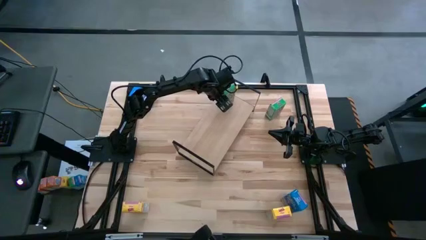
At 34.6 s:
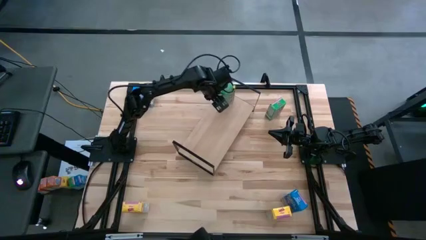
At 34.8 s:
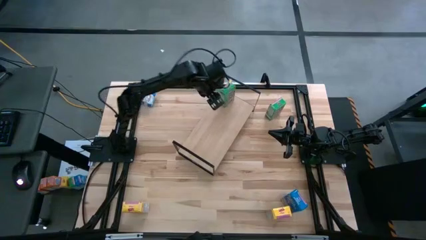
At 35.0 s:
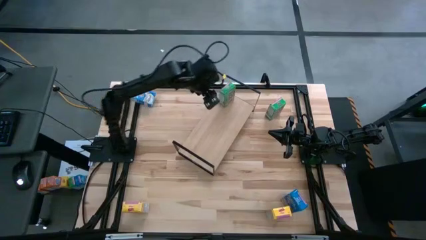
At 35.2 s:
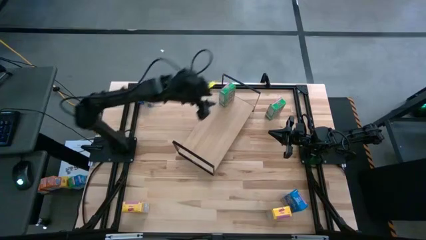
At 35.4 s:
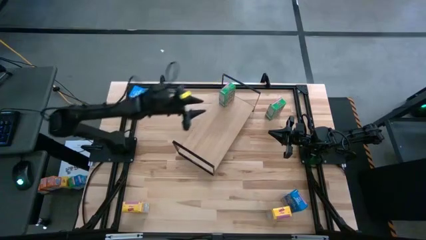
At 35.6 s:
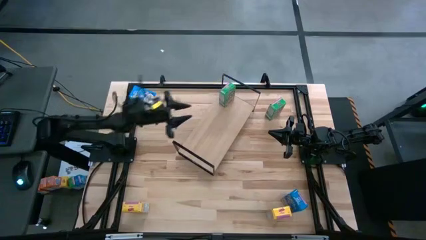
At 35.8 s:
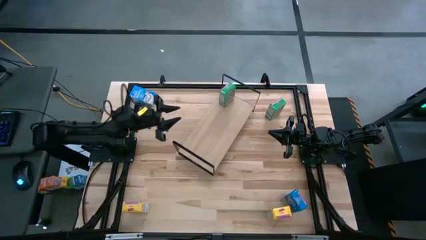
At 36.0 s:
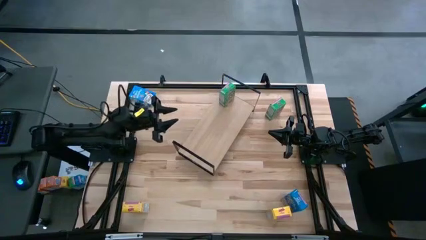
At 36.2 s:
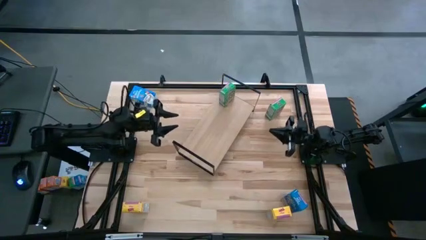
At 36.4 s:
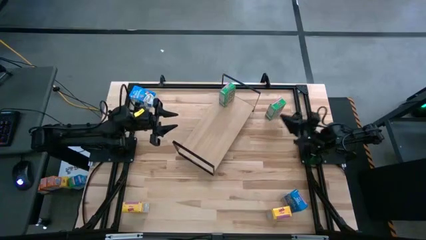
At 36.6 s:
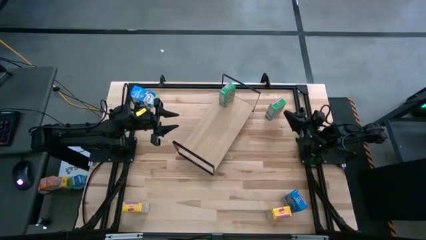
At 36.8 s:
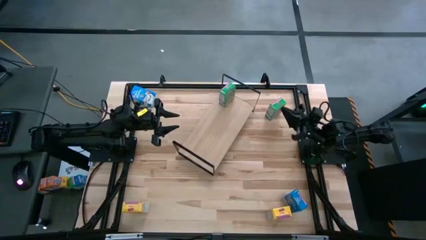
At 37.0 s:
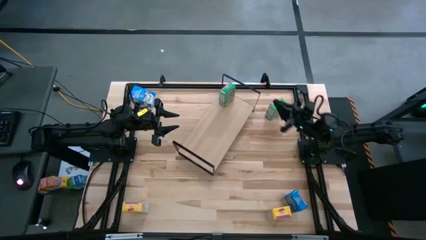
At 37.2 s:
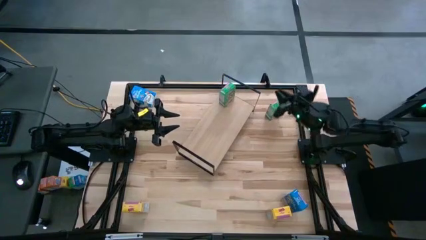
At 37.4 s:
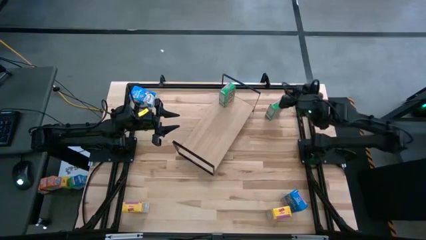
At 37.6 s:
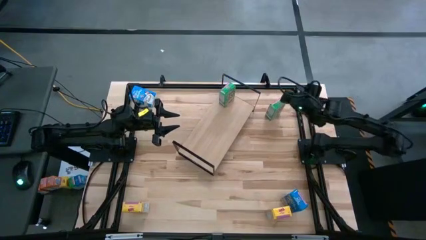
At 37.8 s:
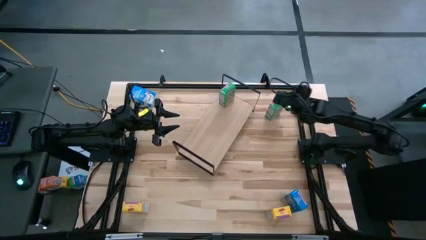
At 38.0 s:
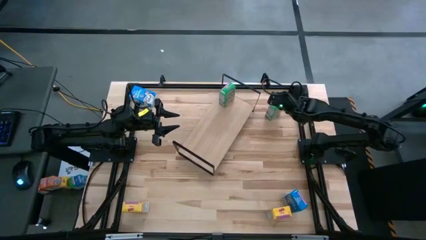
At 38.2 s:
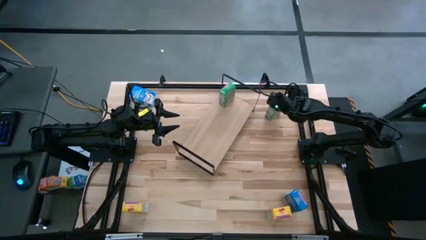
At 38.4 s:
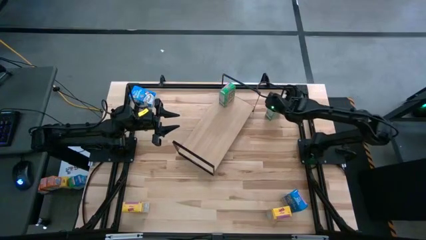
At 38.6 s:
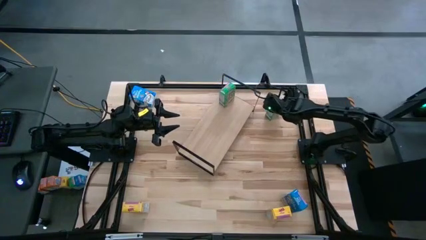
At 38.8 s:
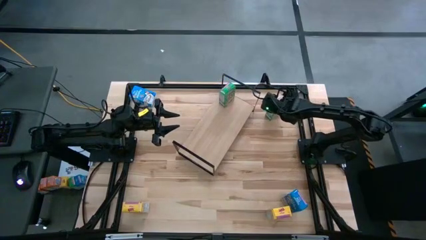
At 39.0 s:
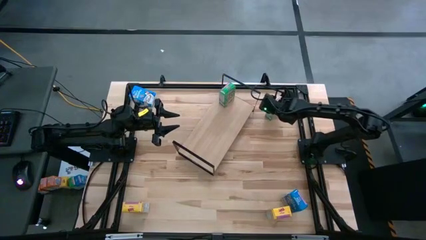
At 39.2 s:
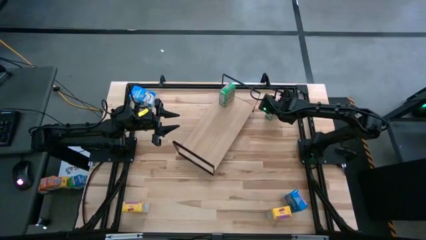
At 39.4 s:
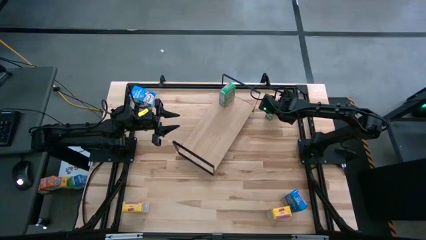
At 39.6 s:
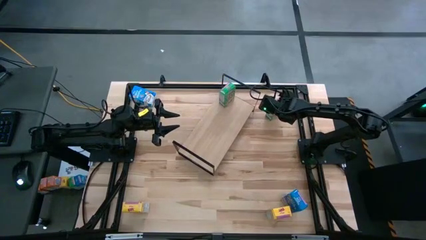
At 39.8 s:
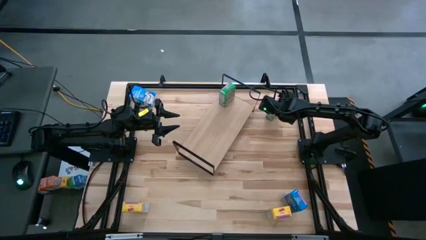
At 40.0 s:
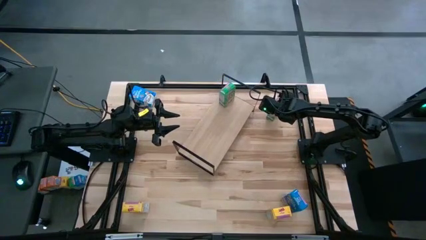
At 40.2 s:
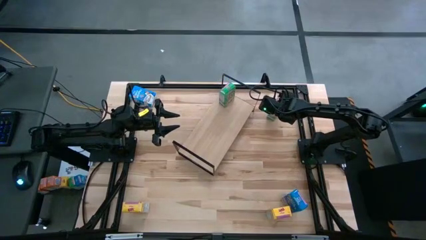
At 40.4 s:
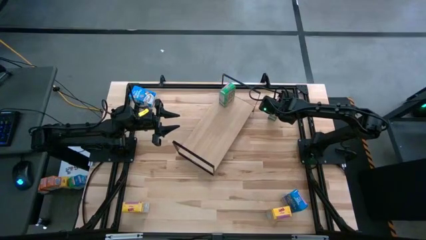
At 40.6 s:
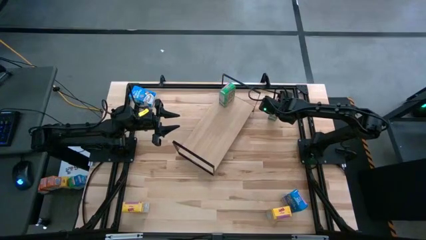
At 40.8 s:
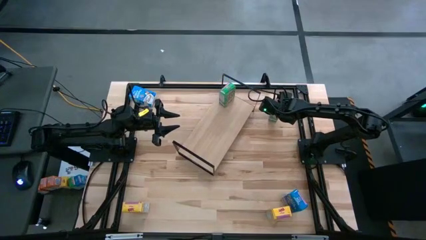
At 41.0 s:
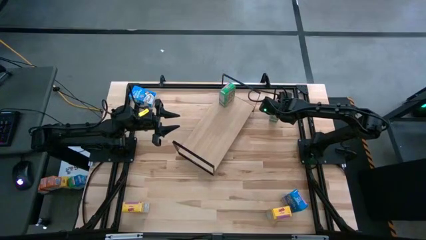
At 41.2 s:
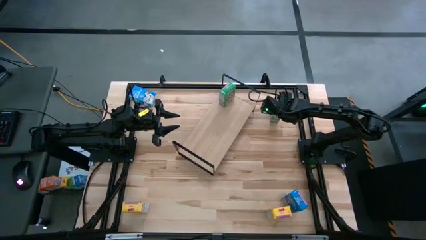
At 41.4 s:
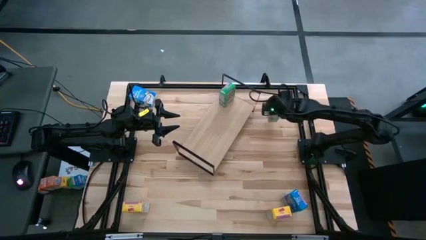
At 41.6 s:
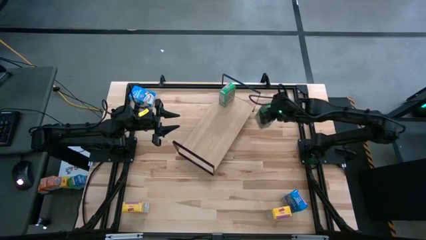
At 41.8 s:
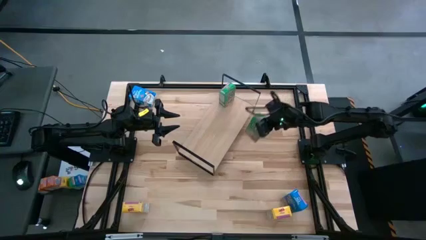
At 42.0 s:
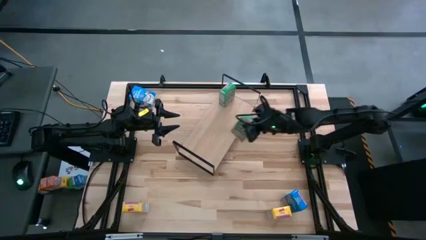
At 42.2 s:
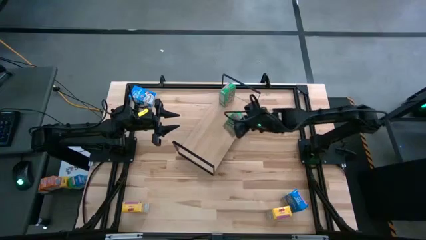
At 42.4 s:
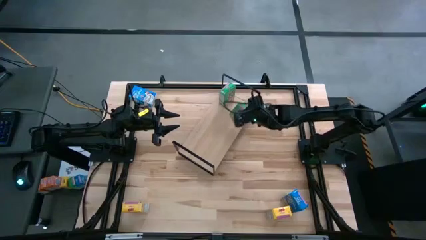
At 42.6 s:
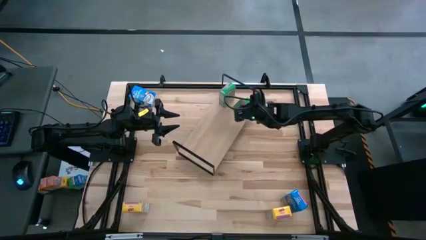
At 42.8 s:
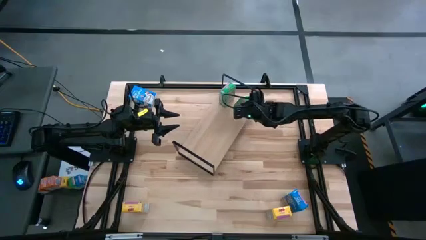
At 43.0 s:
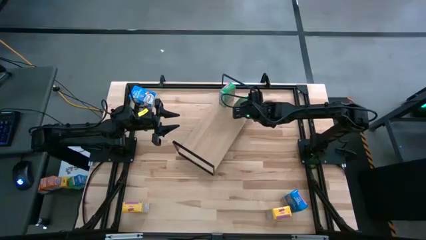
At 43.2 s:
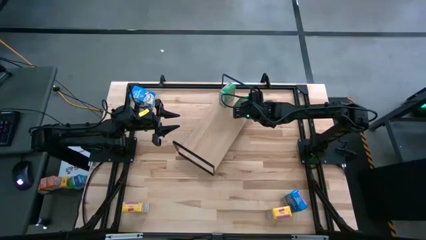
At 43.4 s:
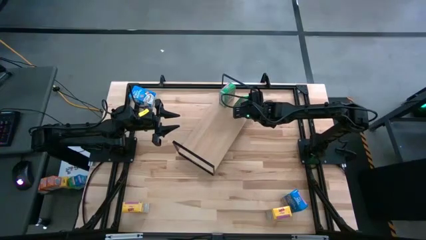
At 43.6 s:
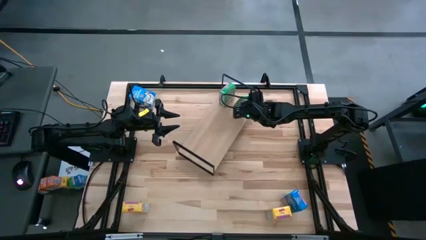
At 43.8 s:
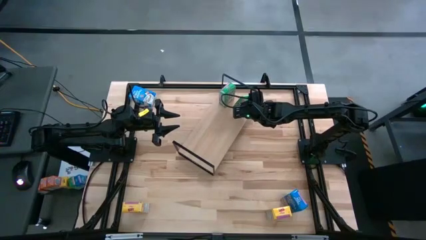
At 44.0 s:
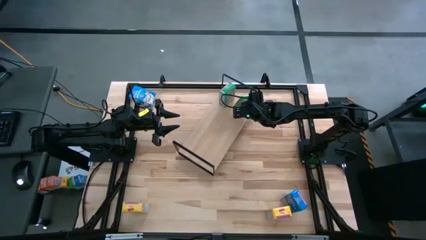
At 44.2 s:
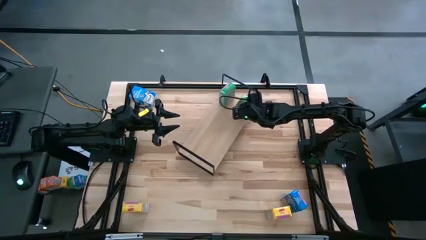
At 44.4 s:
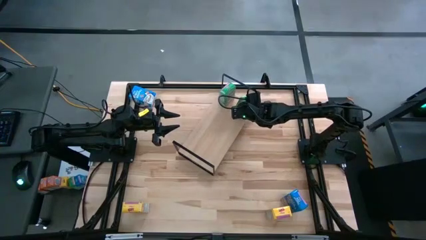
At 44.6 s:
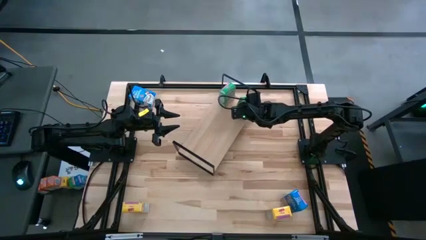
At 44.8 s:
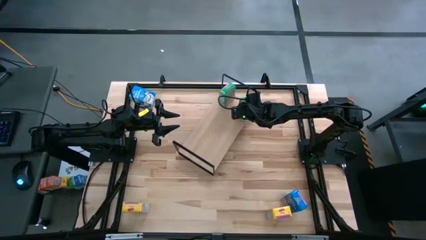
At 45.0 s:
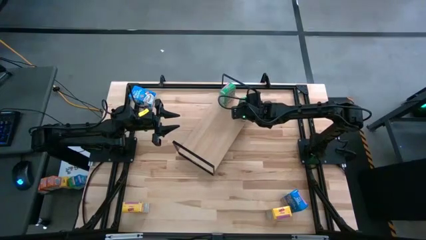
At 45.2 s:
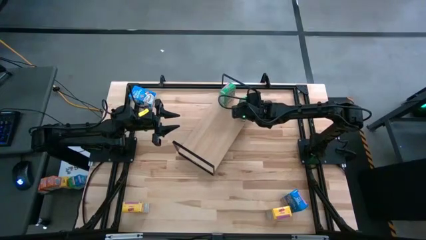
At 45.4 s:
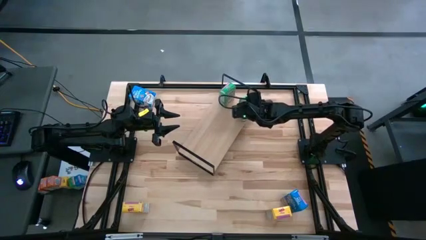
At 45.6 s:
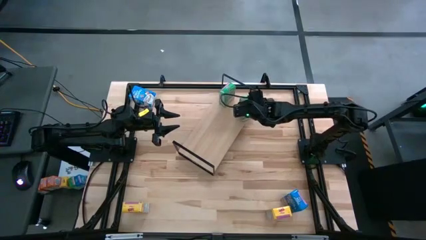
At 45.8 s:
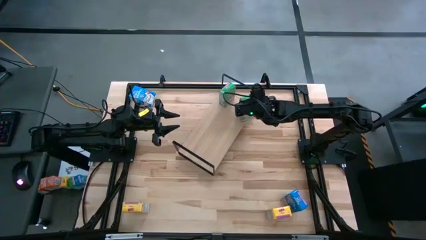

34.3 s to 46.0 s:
Task: Stack cereal on shelf
Put the green cereal box aligned with the other green cereal box on the shelf
